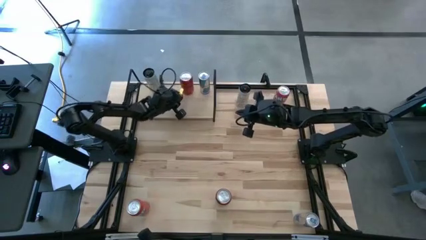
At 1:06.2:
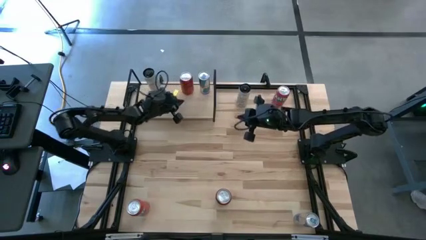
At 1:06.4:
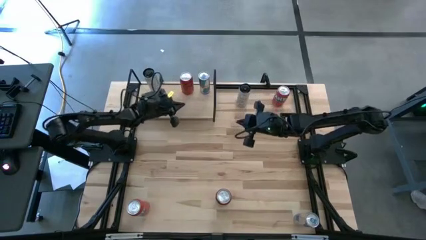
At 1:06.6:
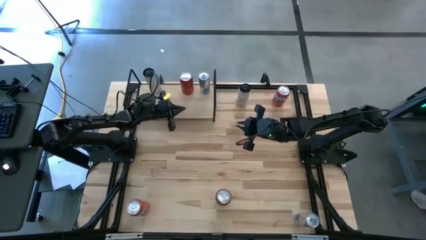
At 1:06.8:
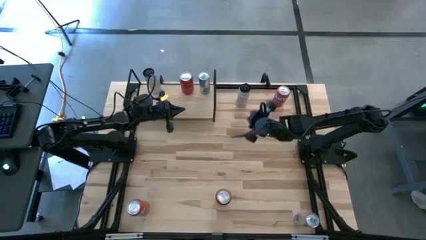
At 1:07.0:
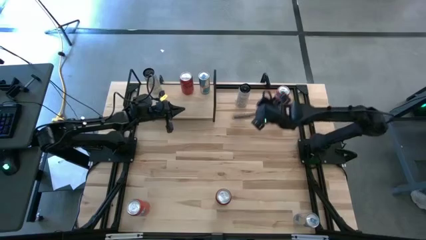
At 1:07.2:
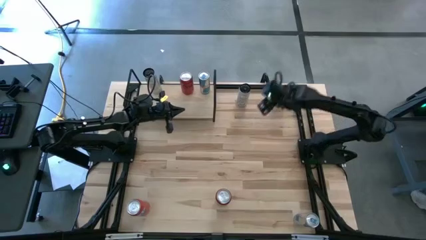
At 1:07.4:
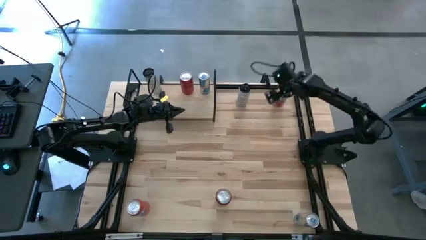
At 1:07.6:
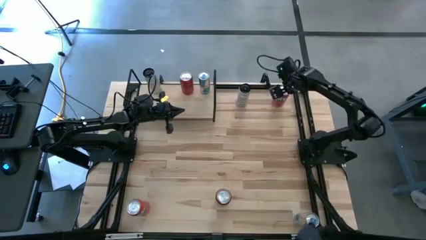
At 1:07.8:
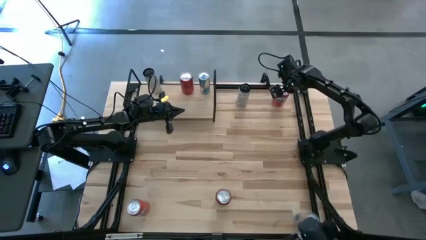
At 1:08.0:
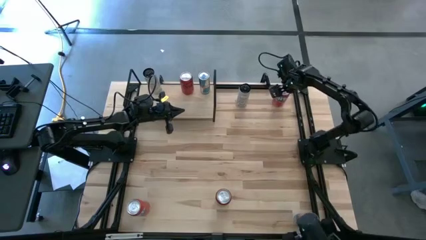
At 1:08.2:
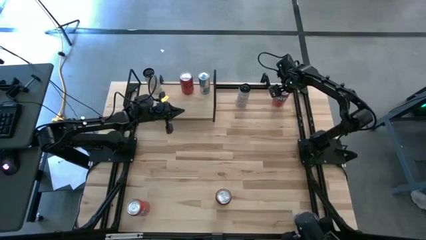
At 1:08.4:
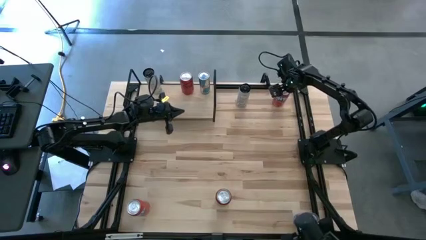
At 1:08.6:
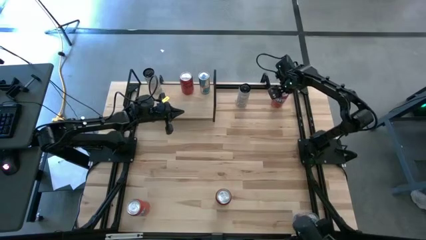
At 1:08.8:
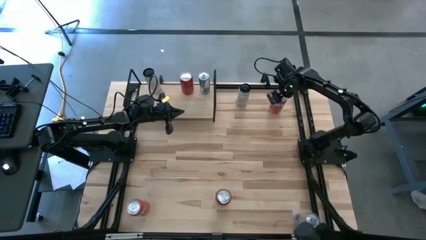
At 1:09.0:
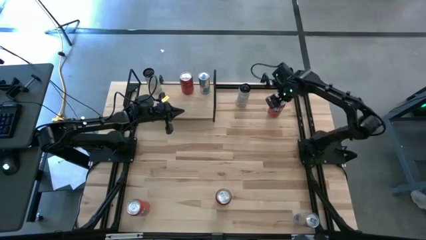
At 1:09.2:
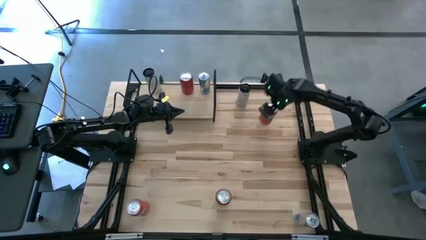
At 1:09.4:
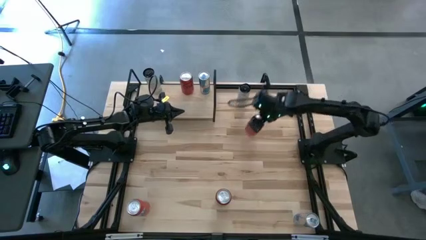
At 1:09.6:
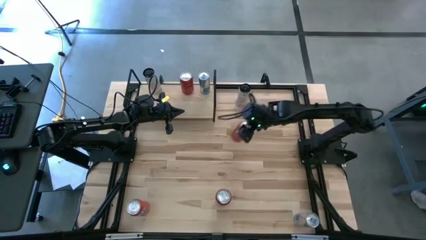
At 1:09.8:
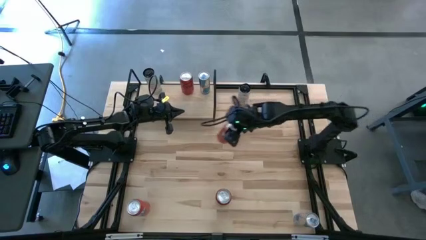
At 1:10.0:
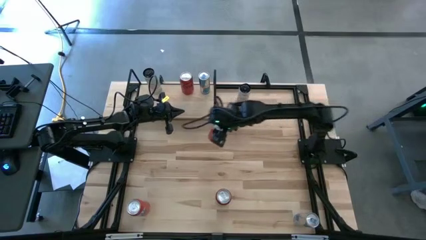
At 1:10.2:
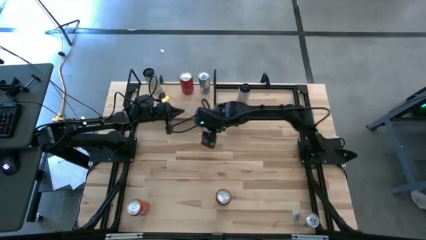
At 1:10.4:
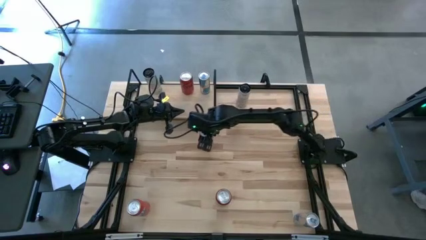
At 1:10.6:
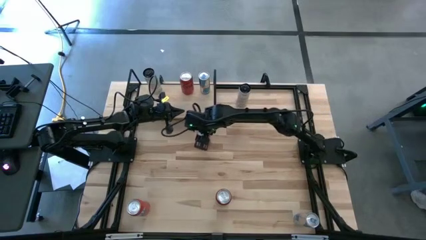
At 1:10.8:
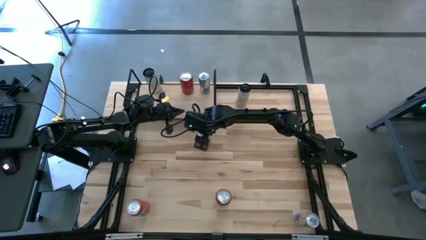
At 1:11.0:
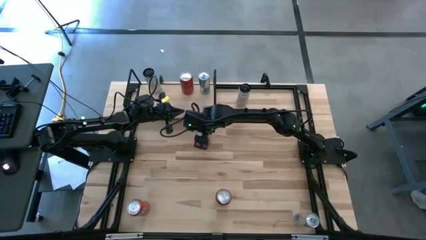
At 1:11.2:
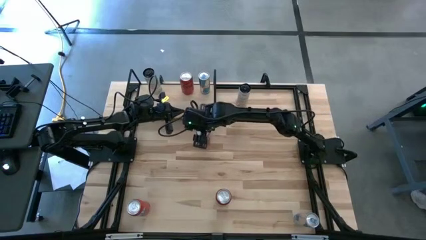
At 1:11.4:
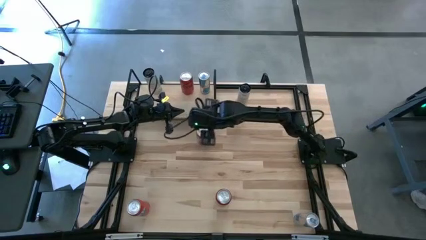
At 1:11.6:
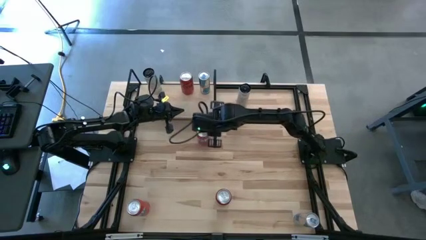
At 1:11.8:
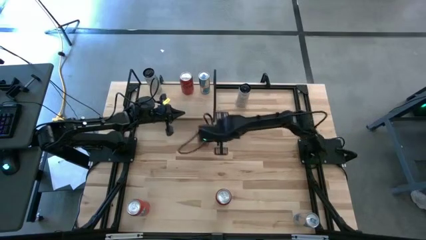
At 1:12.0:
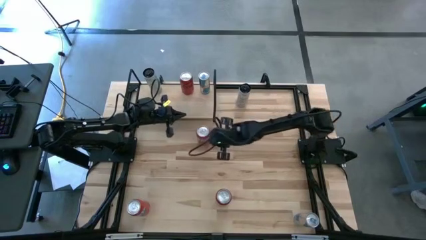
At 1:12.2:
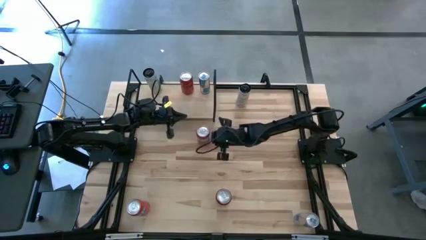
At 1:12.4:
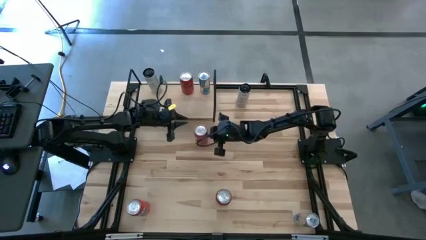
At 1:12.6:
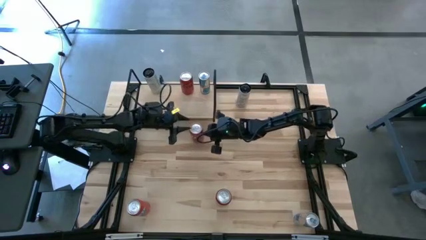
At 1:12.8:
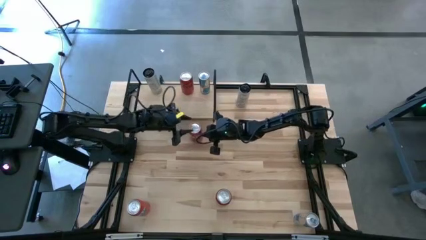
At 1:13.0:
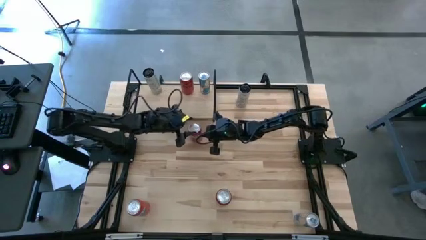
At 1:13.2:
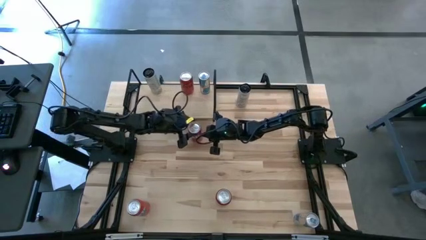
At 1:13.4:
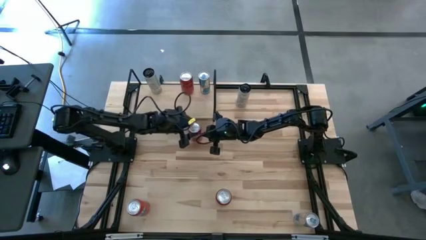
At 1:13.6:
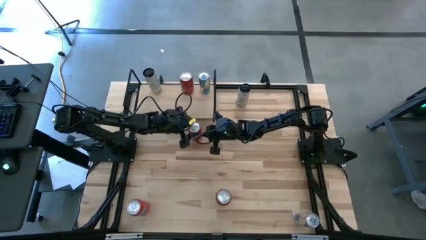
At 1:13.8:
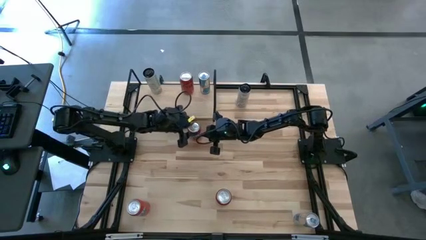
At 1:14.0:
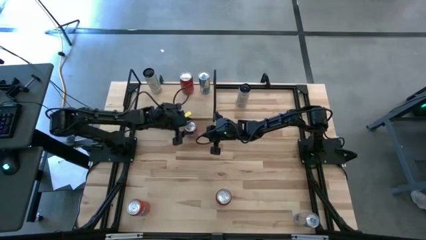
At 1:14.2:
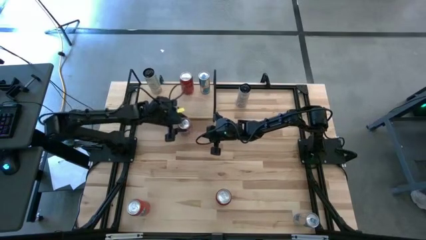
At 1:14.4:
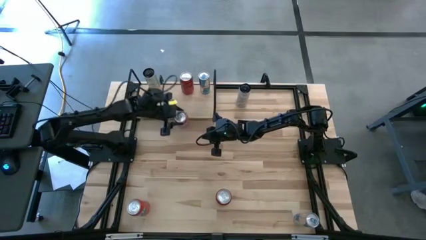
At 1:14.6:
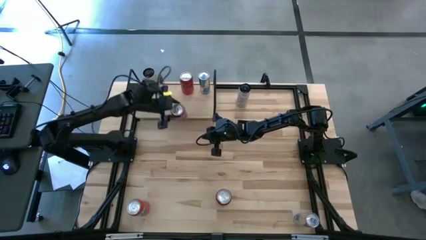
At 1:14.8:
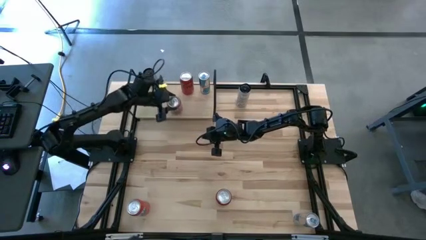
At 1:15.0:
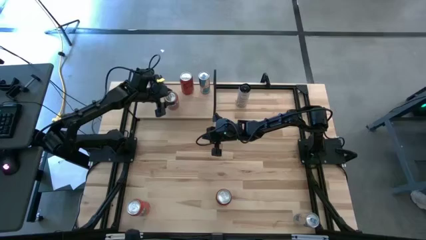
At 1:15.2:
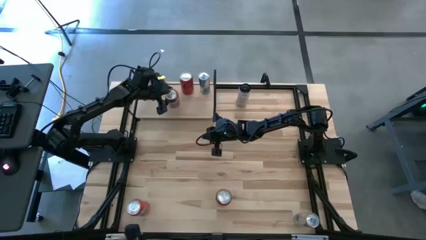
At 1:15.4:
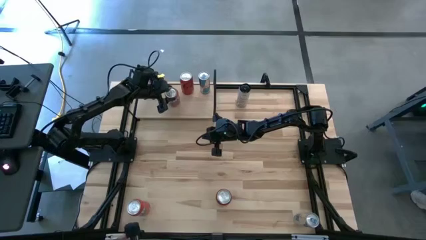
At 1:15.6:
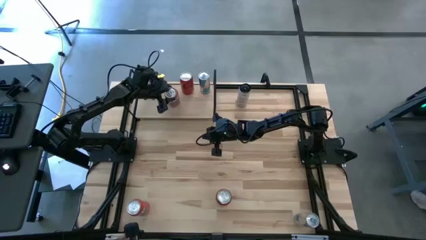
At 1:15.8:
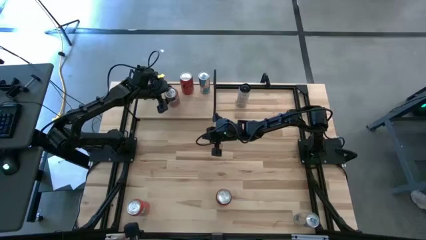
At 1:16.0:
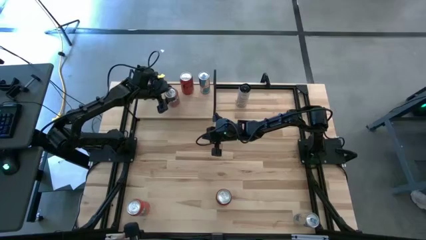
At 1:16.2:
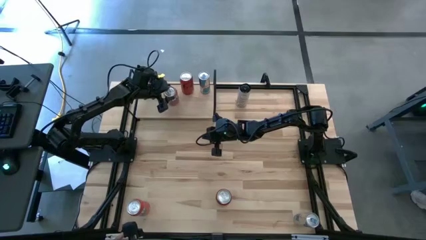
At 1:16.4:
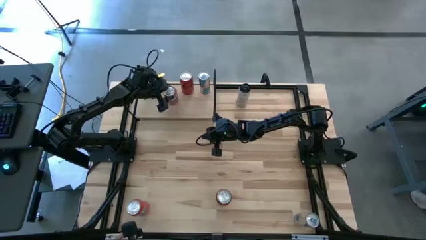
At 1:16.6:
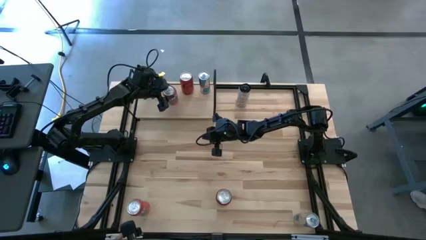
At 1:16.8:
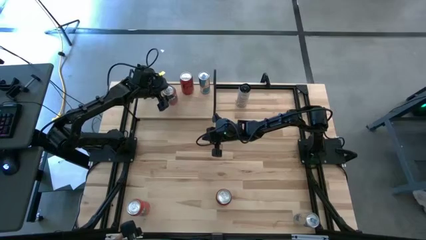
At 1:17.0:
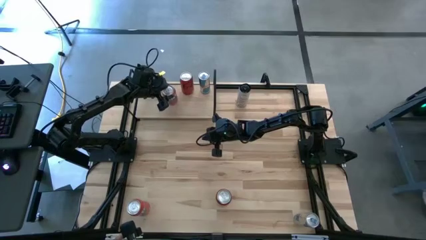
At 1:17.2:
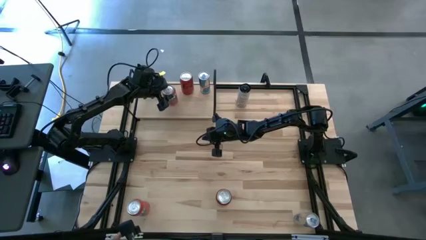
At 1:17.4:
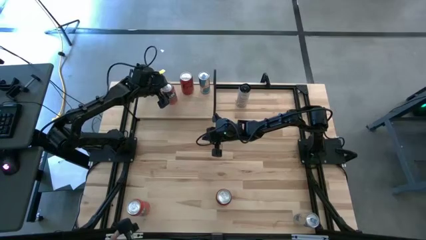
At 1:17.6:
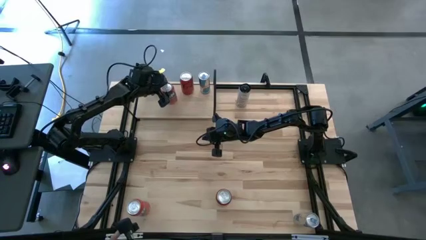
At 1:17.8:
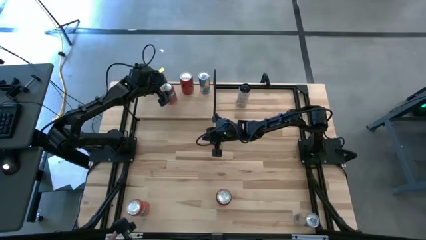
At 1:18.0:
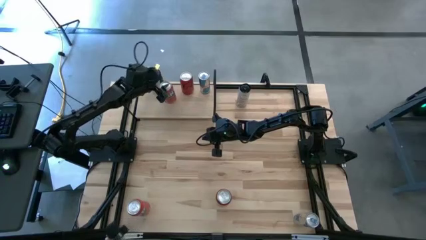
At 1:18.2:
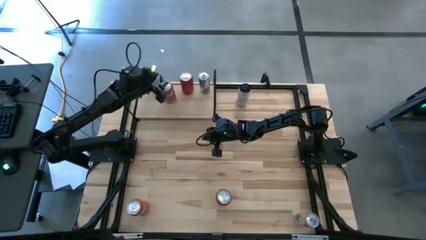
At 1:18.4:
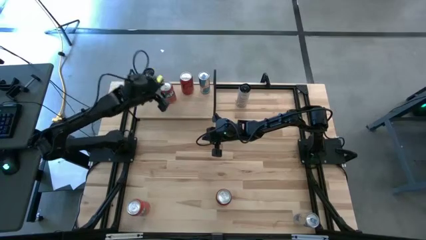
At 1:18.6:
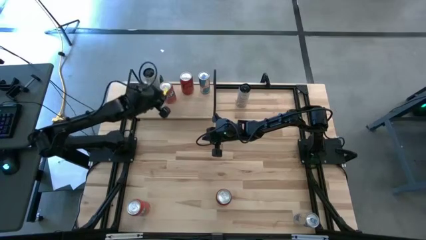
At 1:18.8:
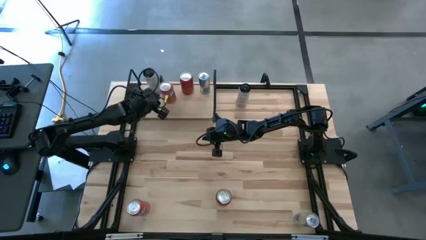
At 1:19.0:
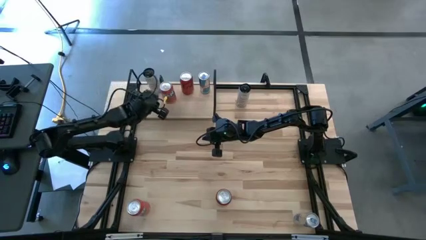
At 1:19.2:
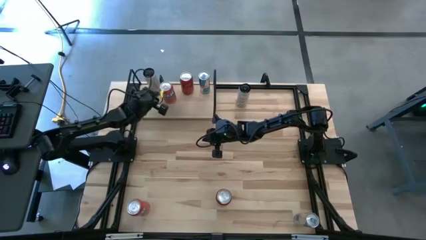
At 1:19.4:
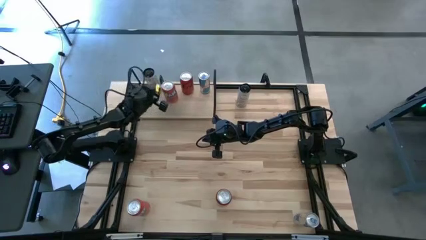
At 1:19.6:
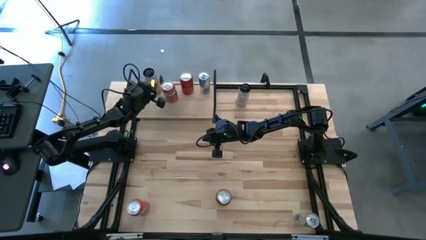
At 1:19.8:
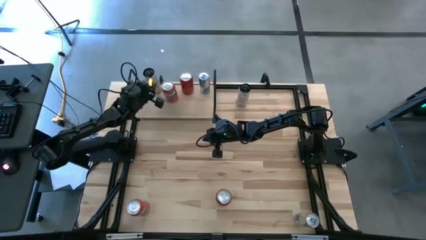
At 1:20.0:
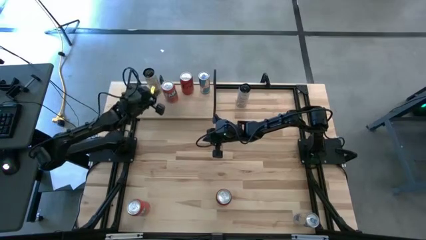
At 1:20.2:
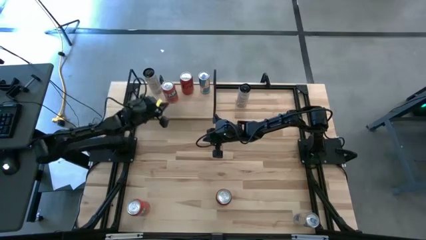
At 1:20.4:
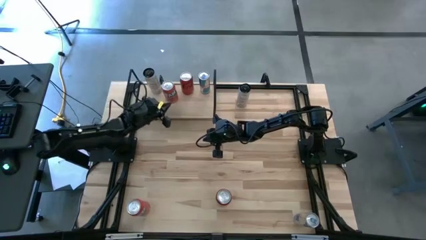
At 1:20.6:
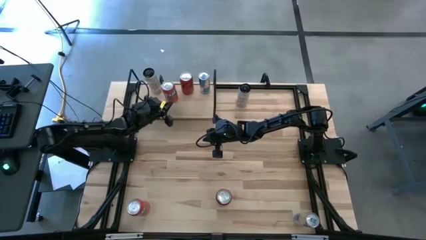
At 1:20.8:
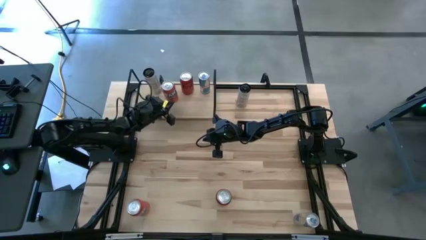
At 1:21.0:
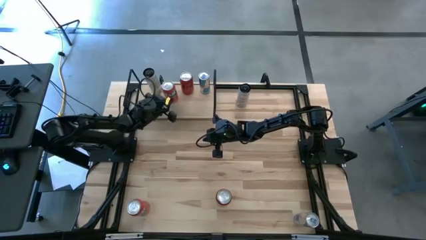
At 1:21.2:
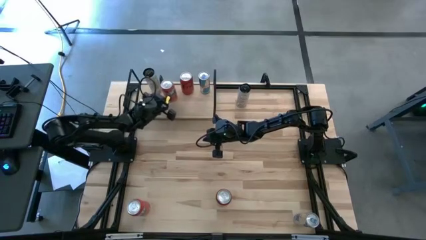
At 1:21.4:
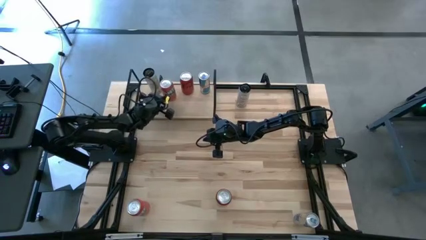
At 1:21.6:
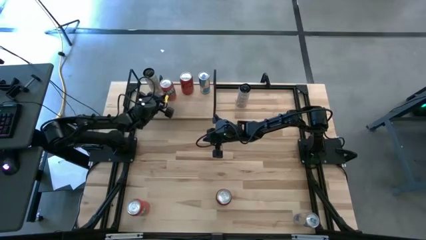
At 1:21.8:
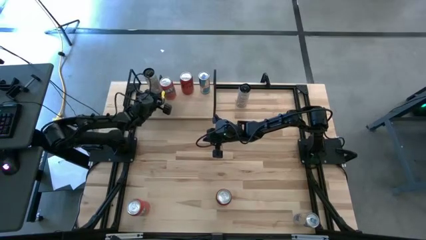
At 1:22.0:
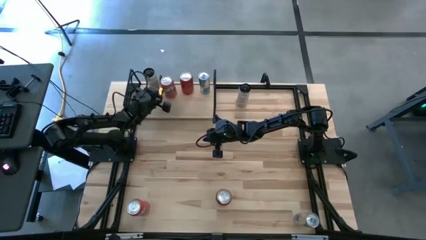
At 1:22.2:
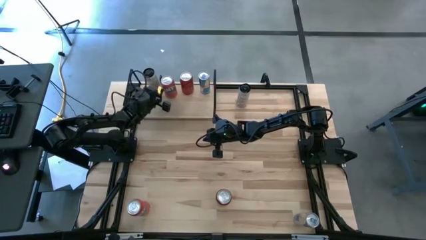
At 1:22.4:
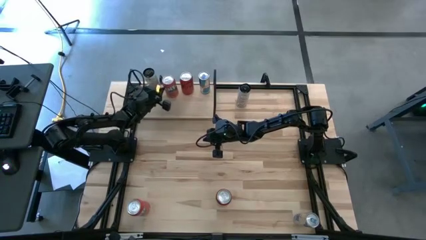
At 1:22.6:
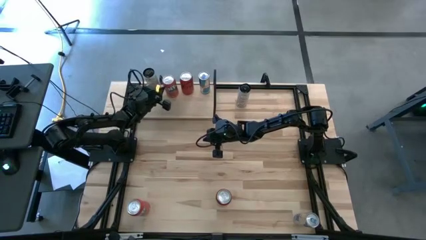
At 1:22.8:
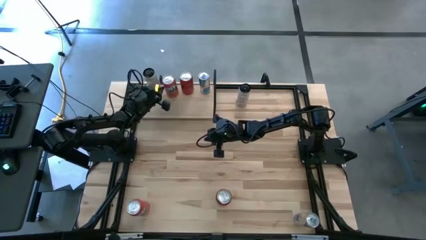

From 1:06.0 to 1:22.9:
Task: Place canned beverage on shelf
Put the top orange soda can on the shelf
